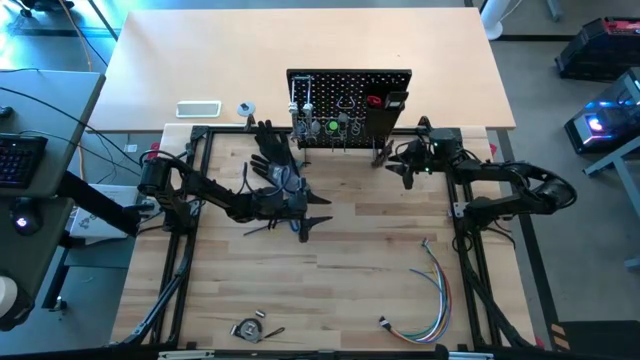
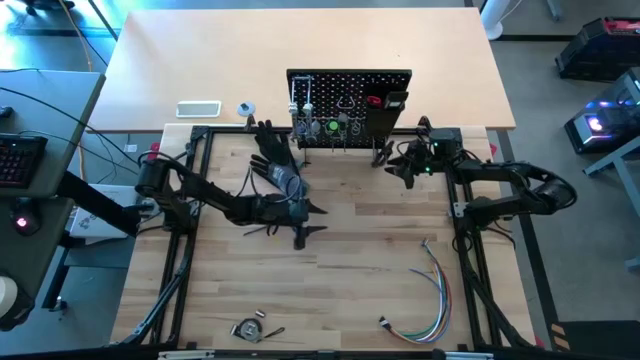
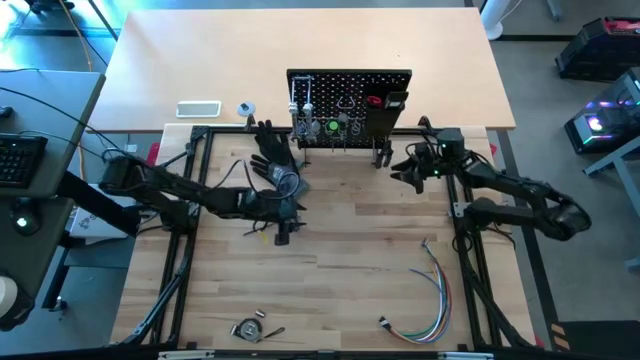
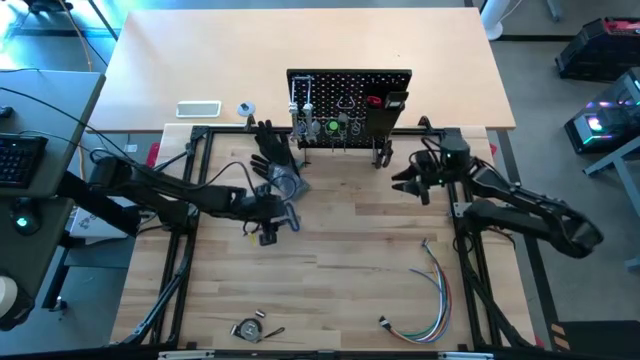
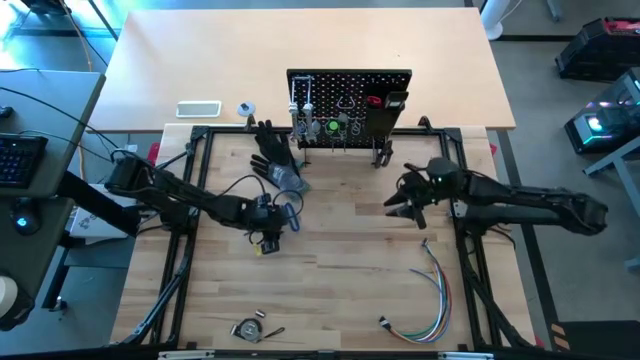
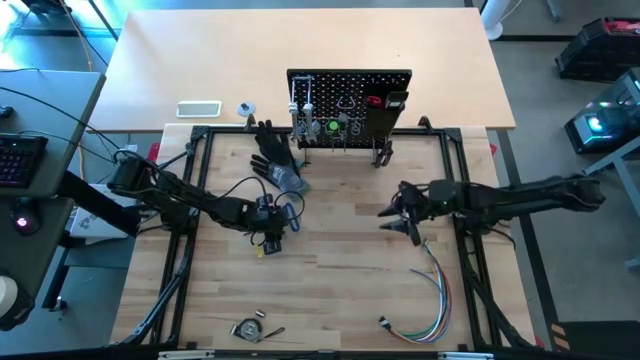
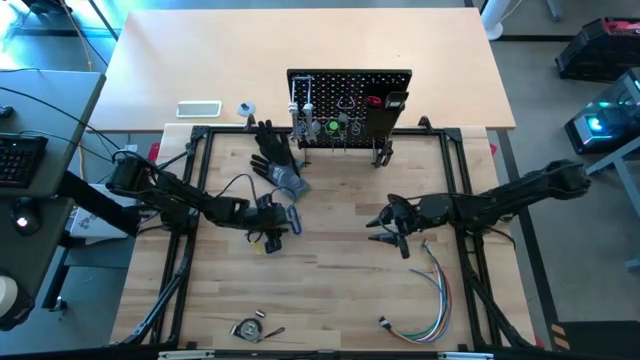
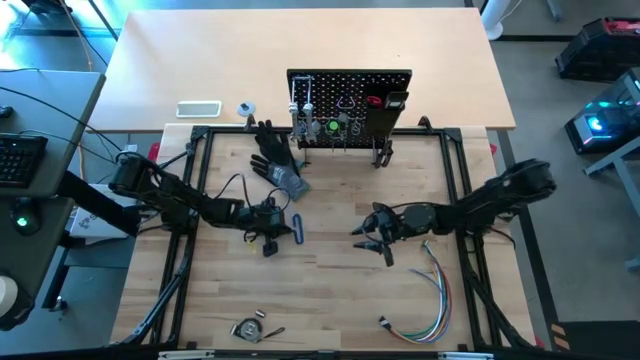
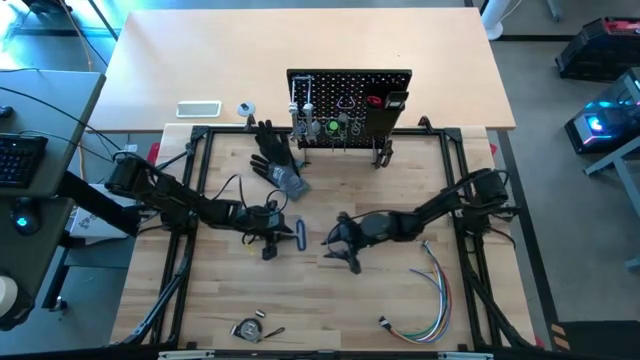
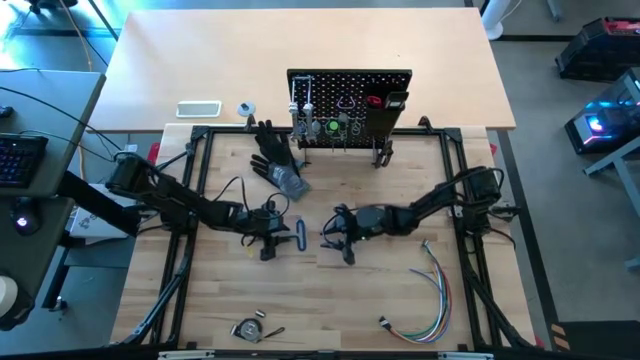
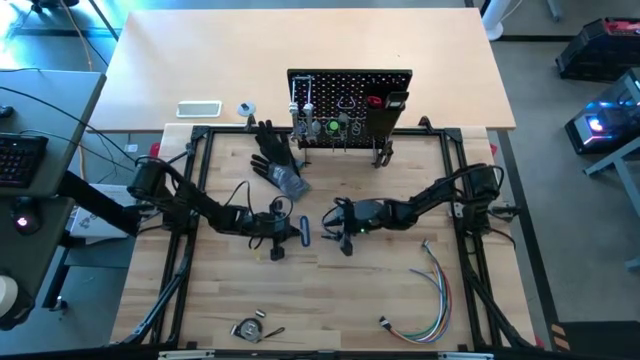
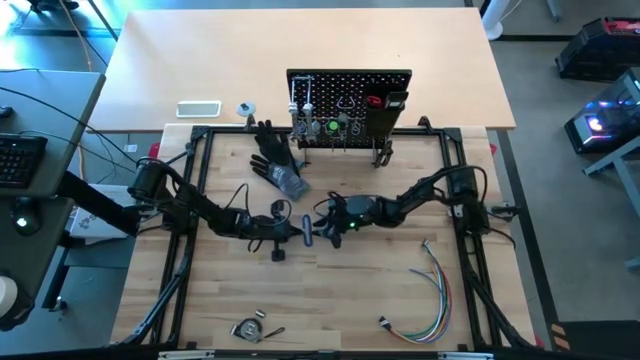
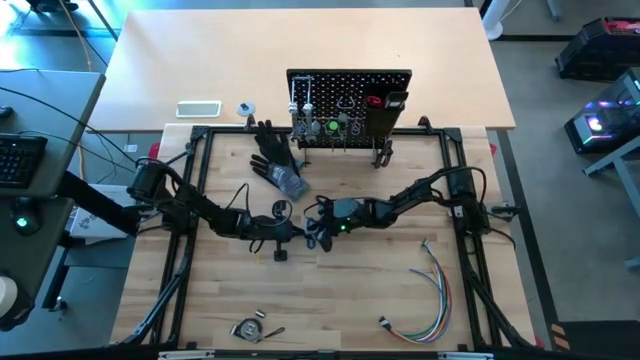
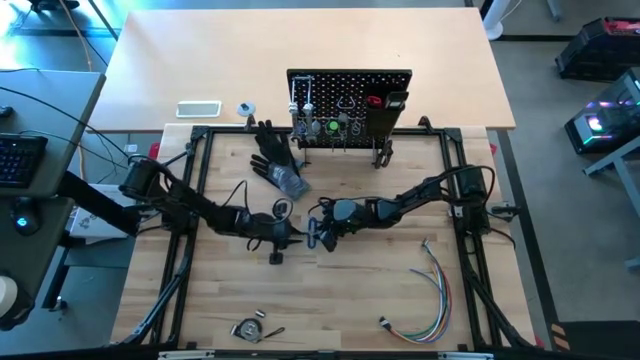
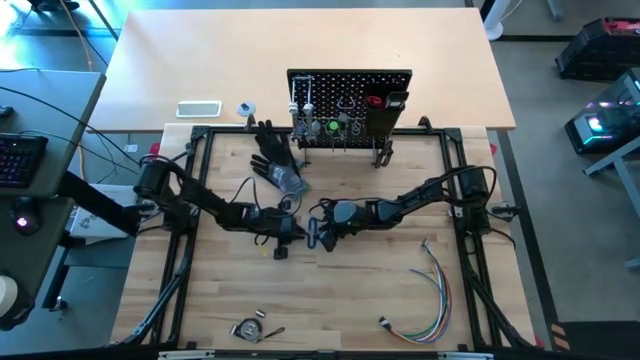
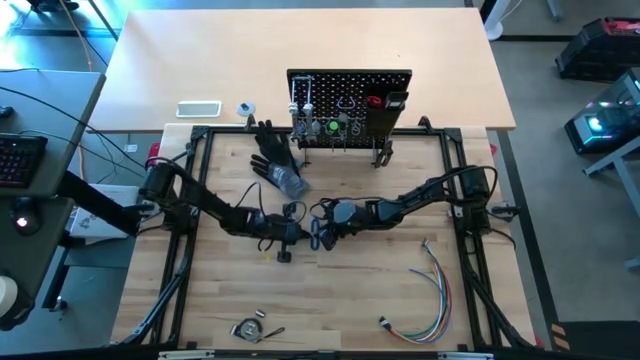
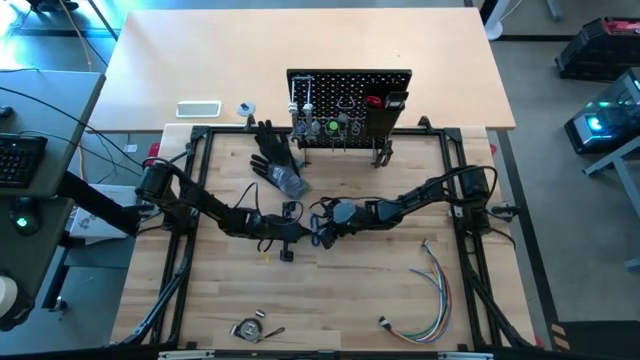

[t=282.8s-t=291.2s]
Task: Hang tools onto peg board
Hang the blue pick tool on the pegboard

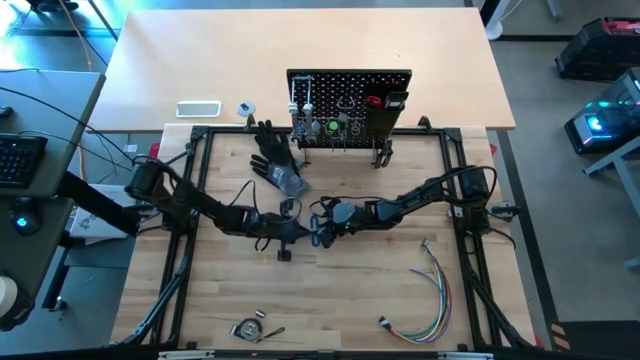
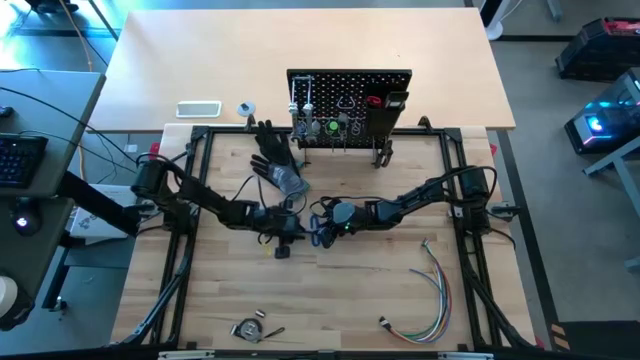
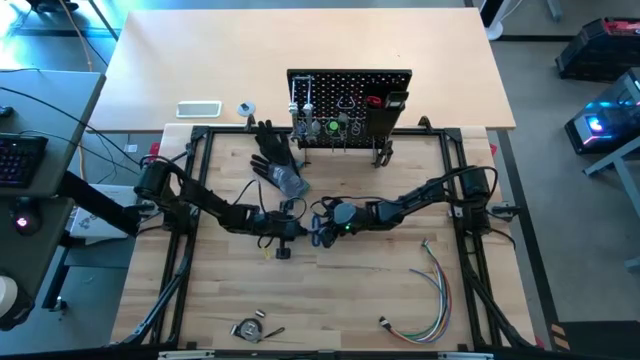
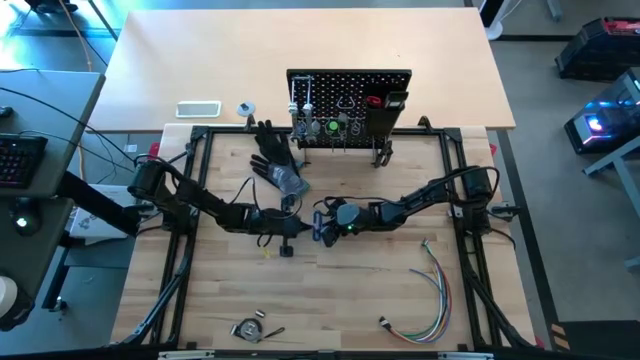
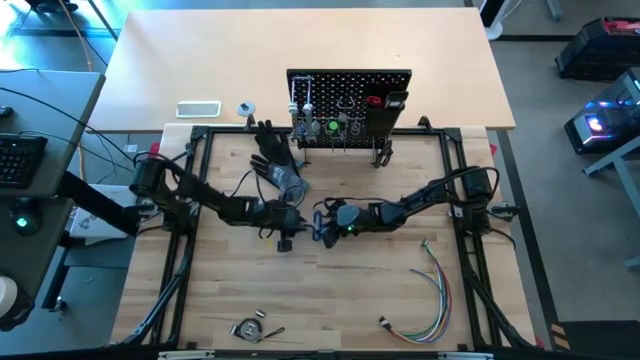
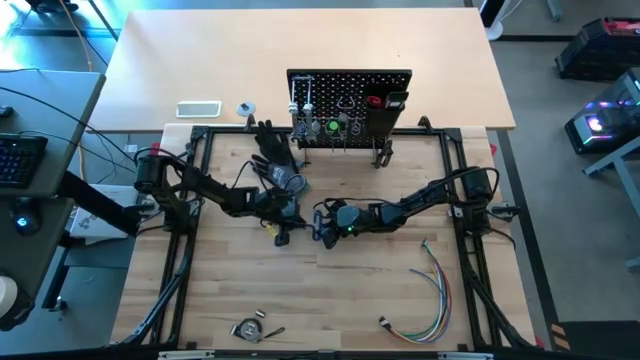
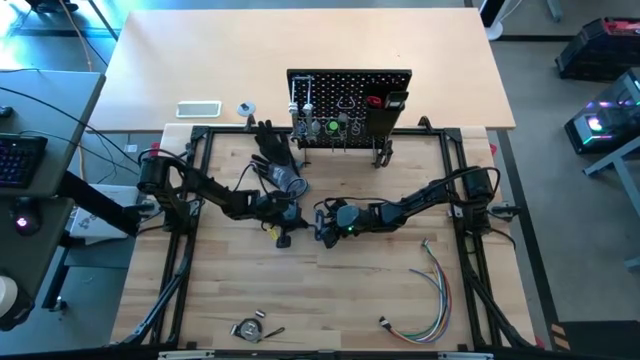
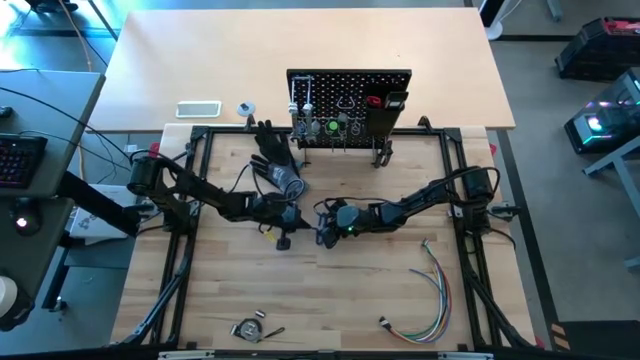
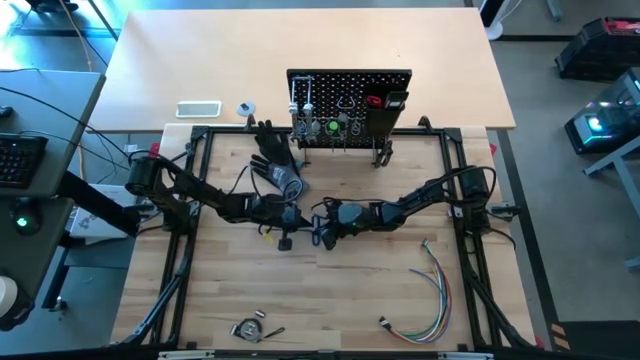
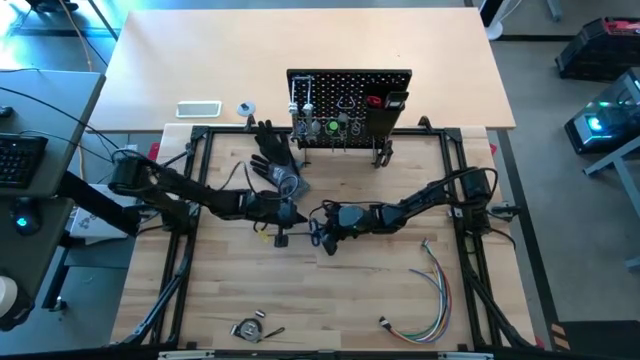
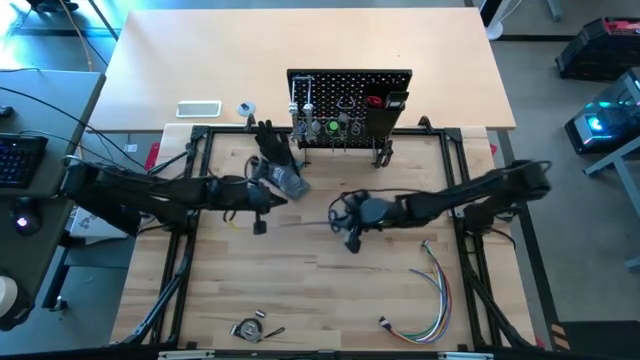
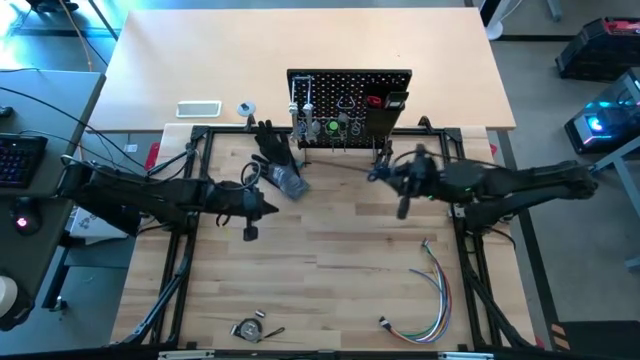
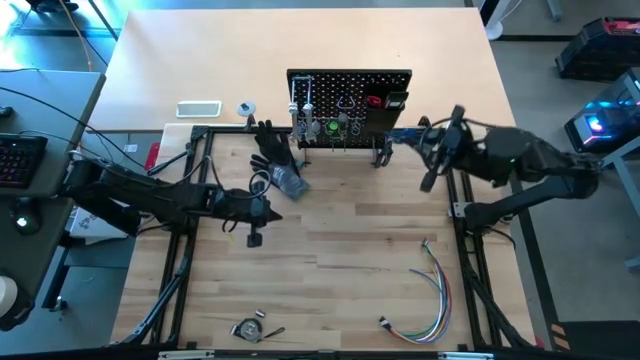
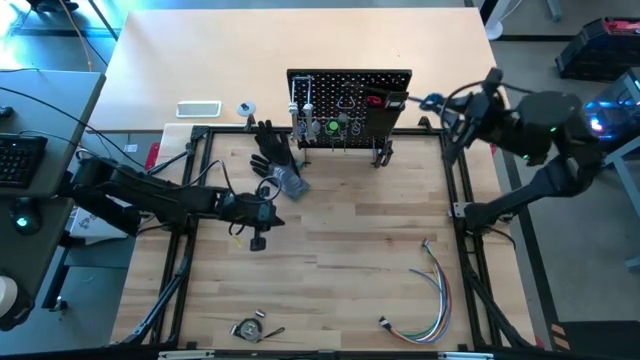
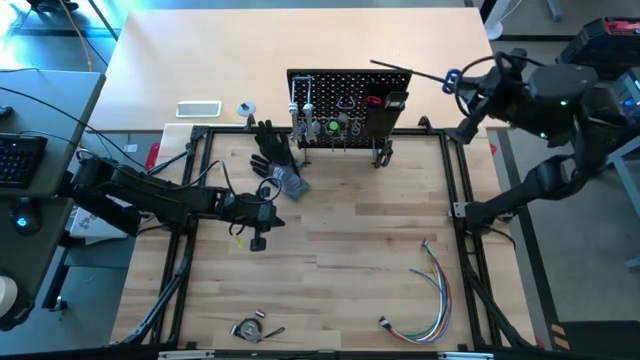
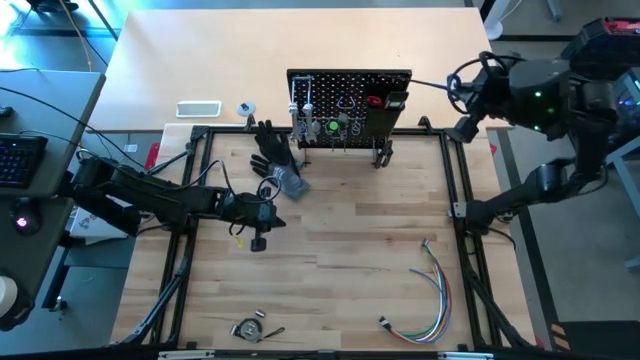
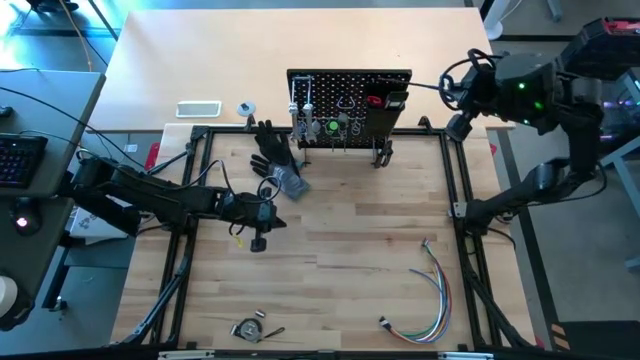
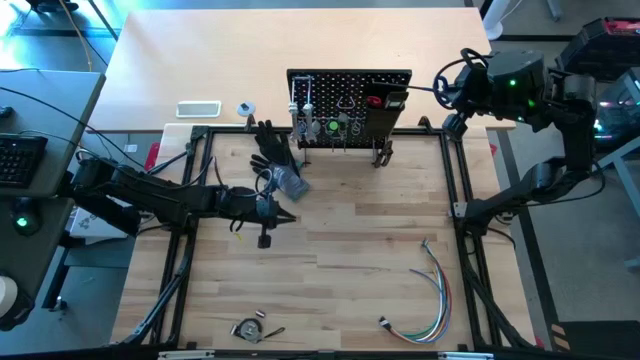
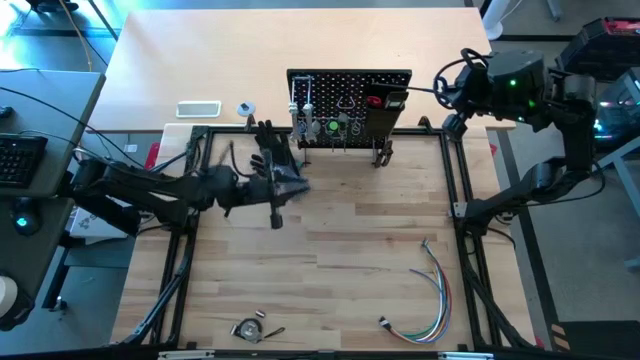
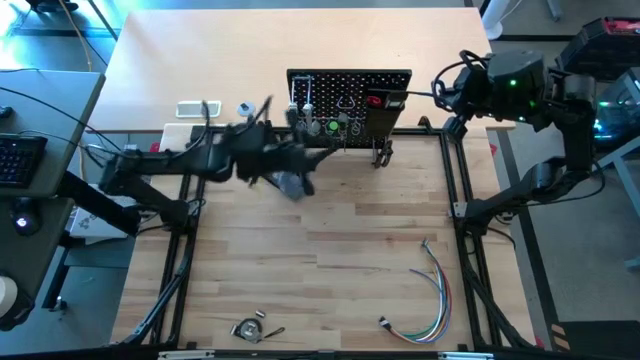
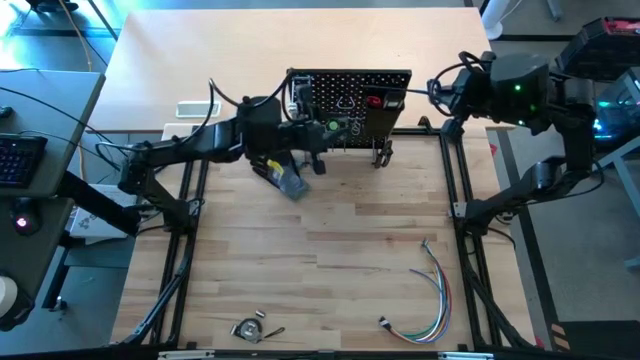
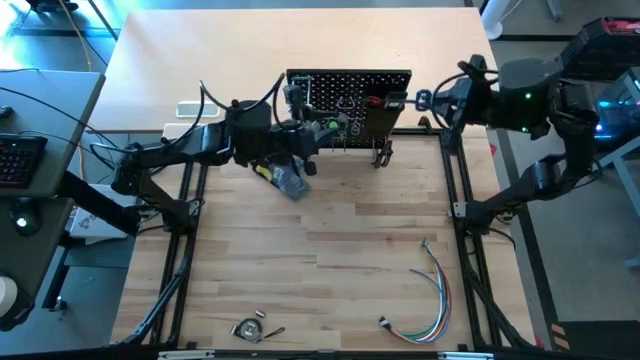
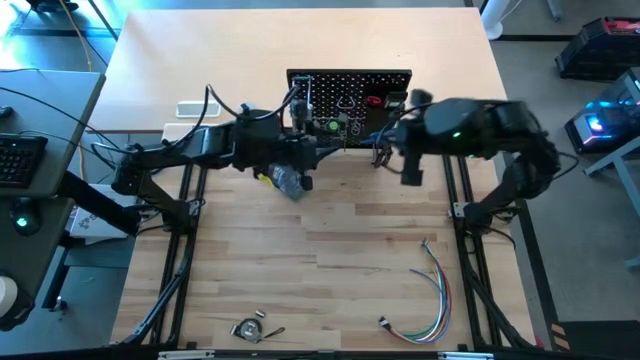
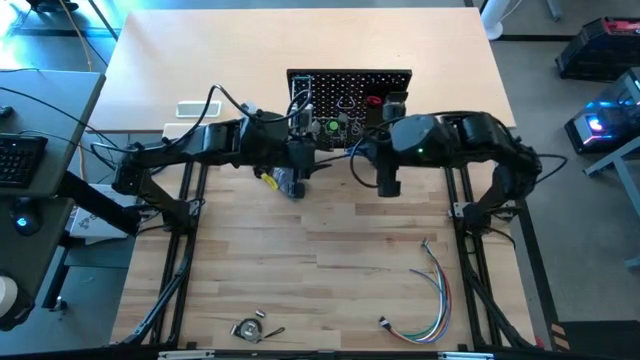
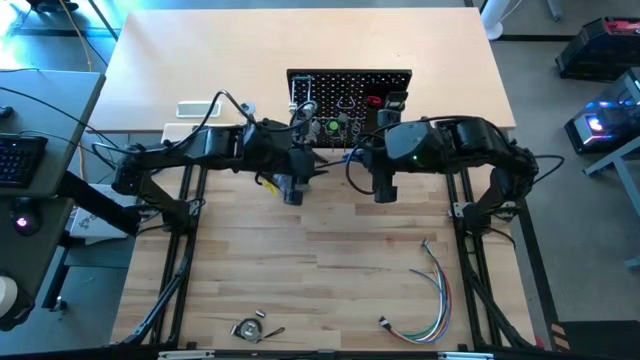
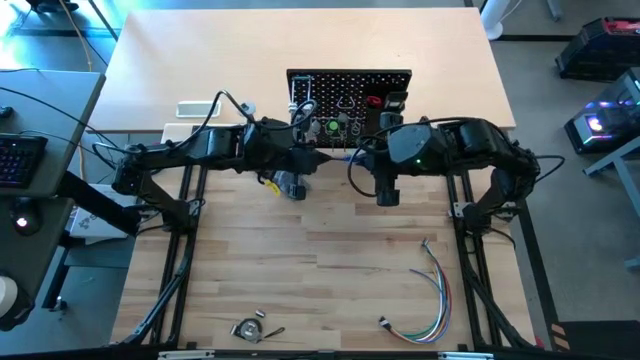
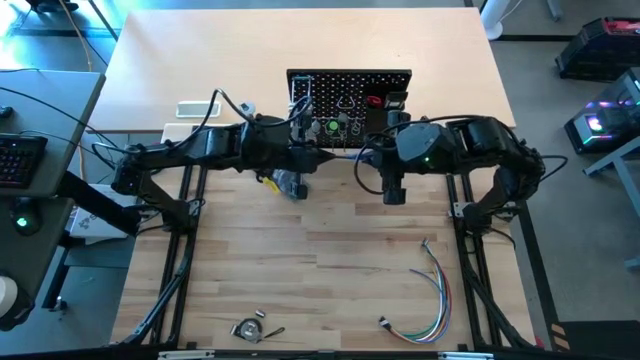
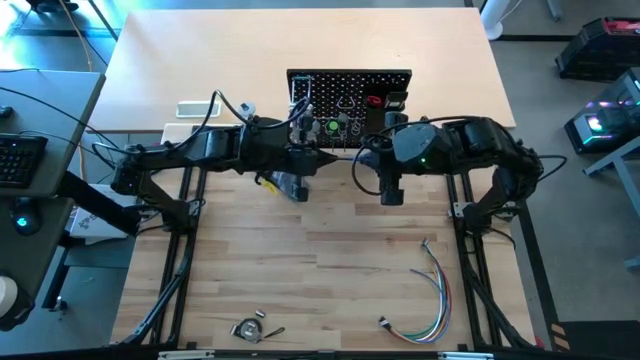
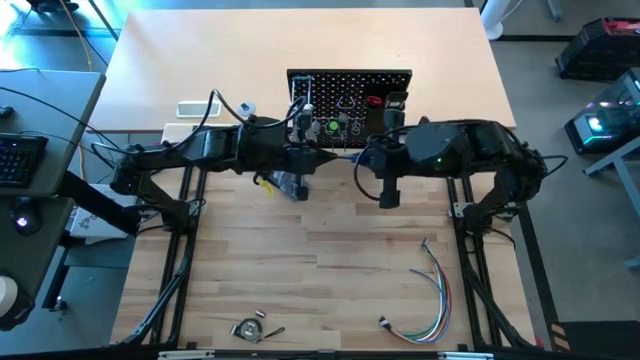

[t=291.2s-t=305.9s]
Hang the blue pick tool on the pegboard
